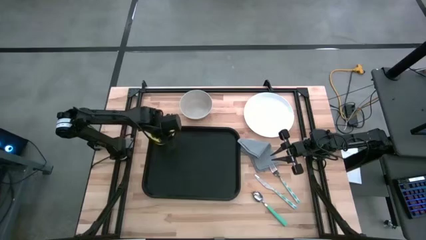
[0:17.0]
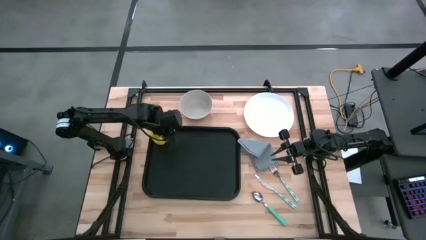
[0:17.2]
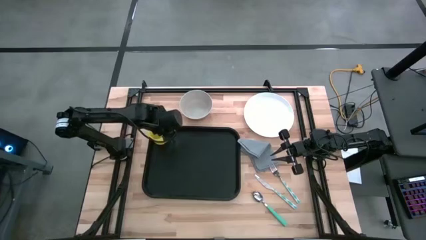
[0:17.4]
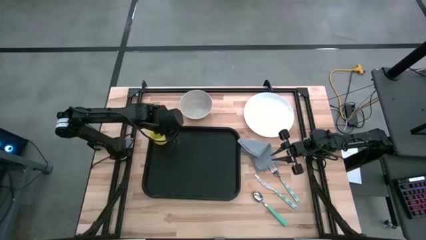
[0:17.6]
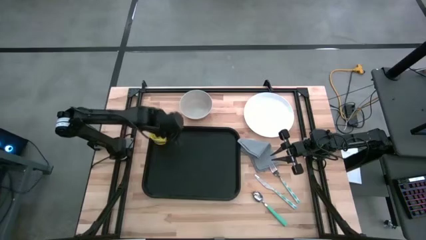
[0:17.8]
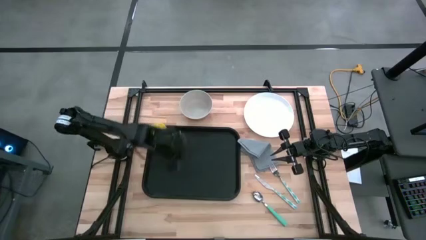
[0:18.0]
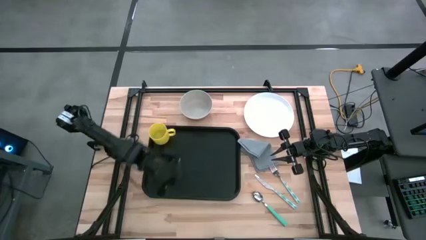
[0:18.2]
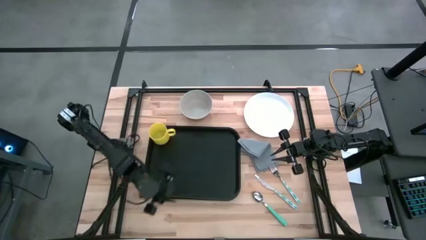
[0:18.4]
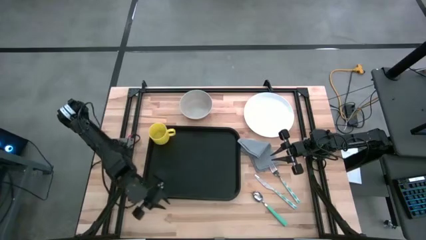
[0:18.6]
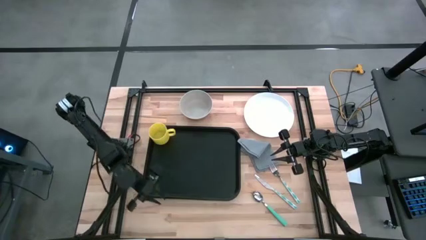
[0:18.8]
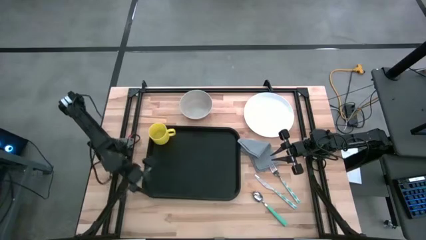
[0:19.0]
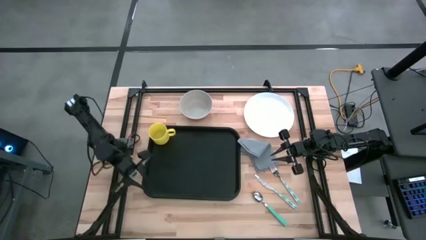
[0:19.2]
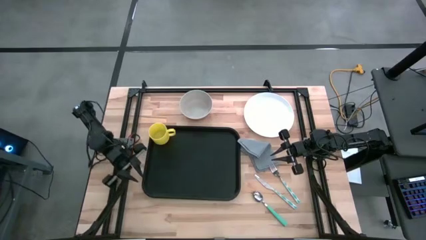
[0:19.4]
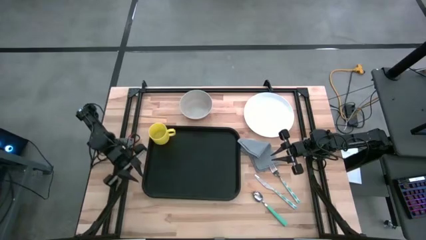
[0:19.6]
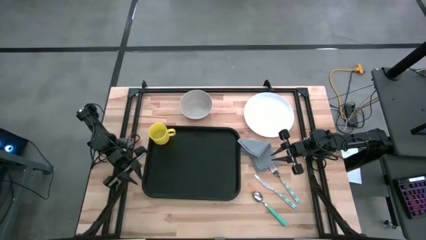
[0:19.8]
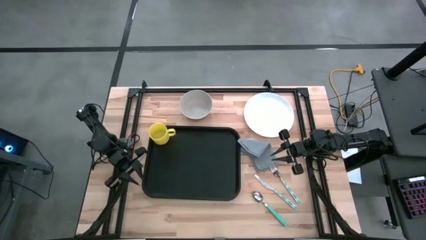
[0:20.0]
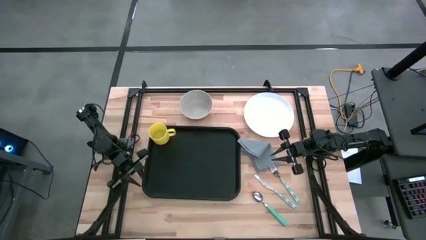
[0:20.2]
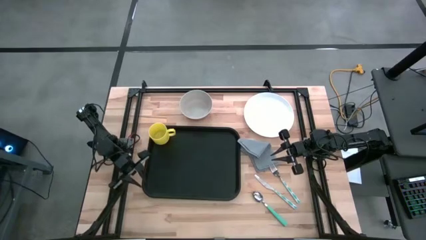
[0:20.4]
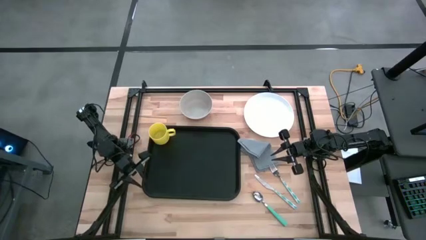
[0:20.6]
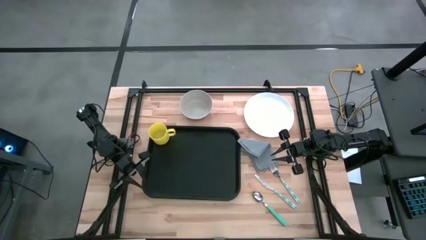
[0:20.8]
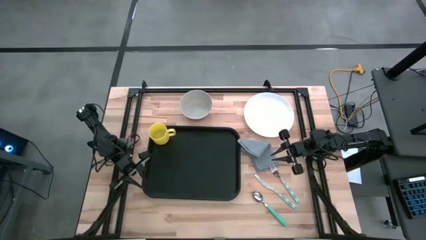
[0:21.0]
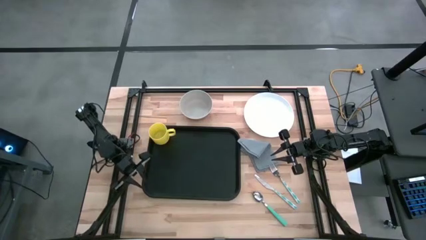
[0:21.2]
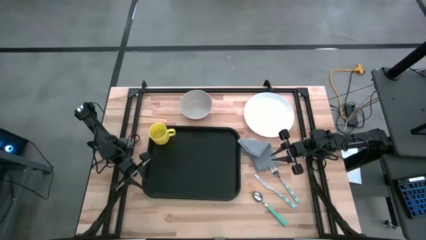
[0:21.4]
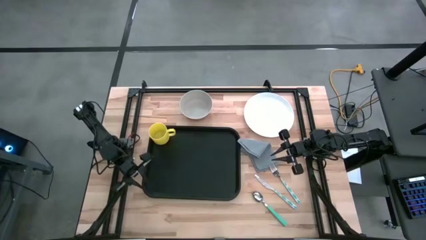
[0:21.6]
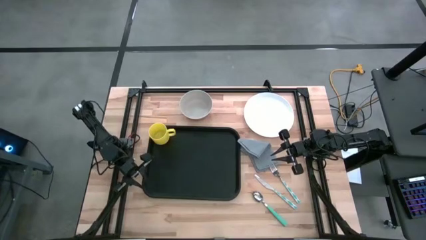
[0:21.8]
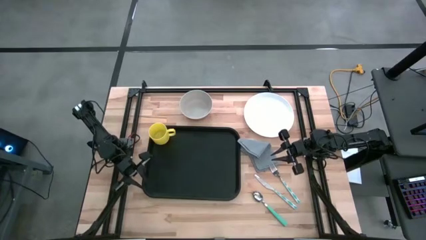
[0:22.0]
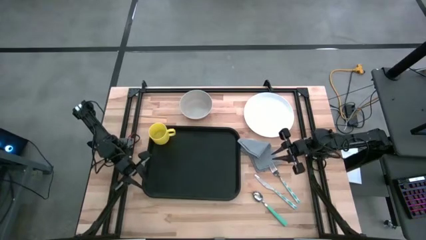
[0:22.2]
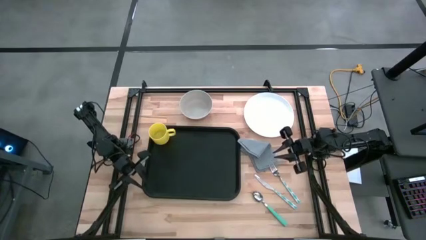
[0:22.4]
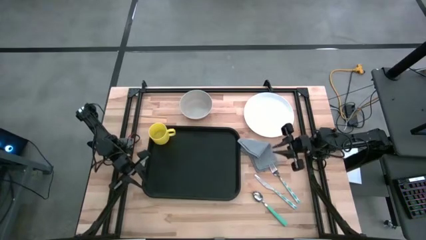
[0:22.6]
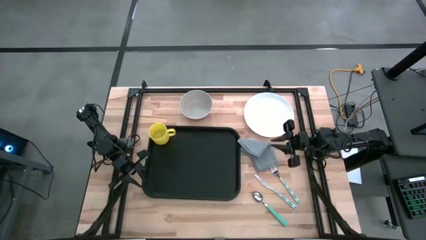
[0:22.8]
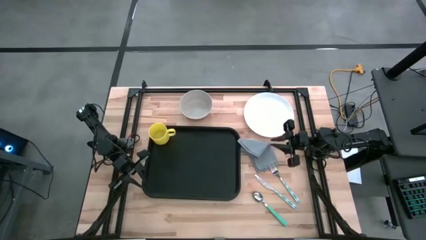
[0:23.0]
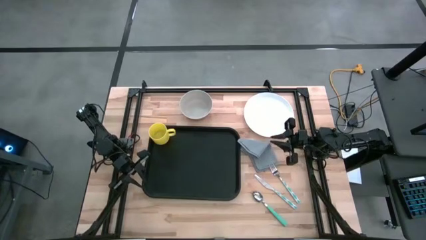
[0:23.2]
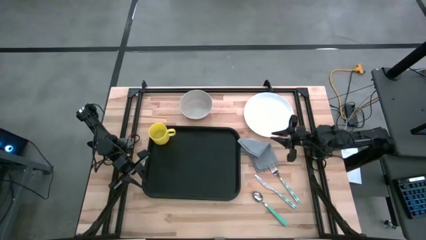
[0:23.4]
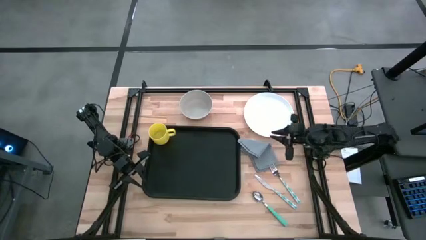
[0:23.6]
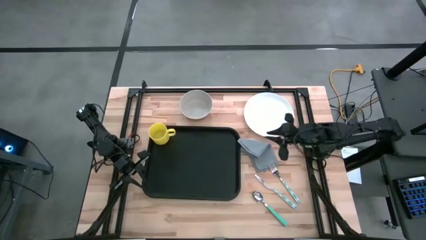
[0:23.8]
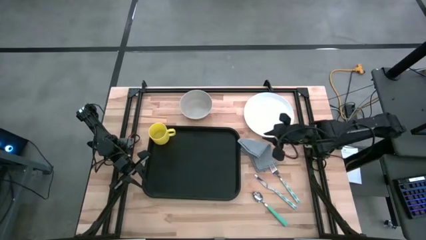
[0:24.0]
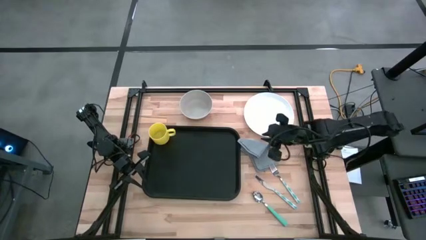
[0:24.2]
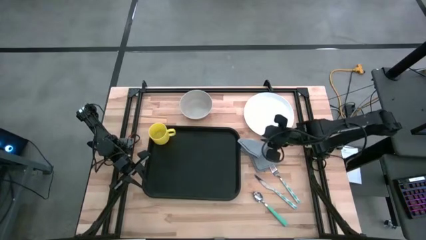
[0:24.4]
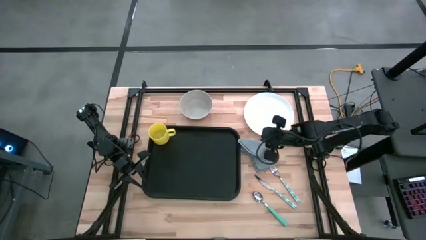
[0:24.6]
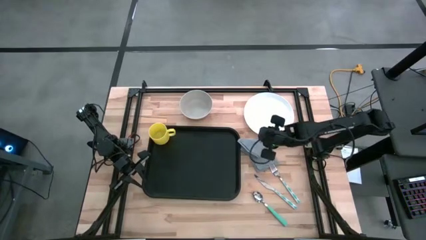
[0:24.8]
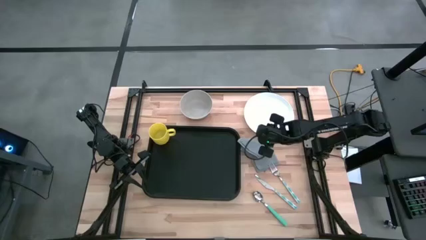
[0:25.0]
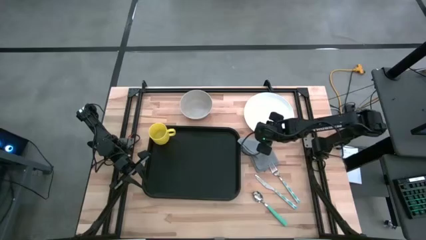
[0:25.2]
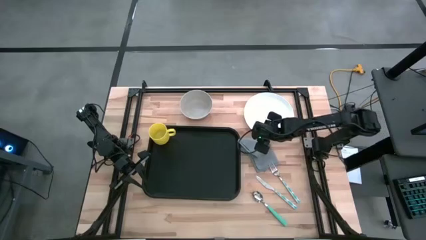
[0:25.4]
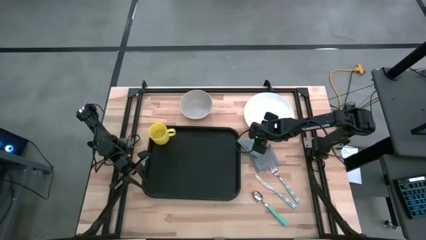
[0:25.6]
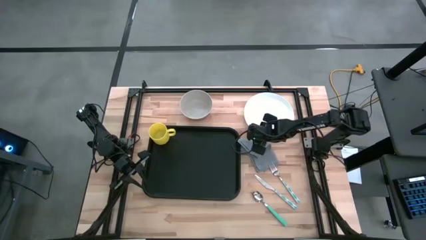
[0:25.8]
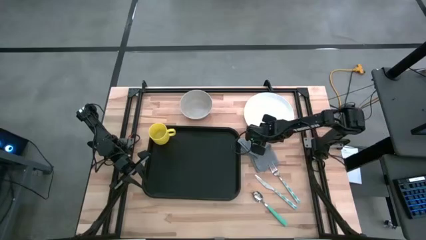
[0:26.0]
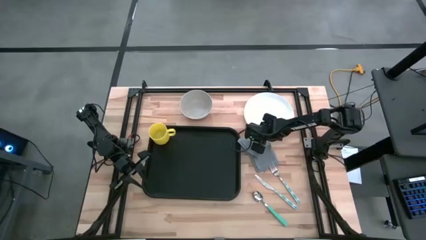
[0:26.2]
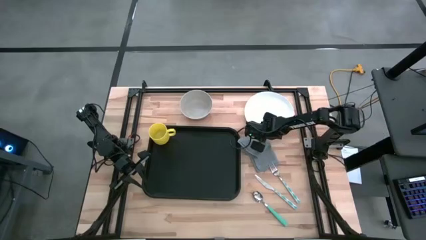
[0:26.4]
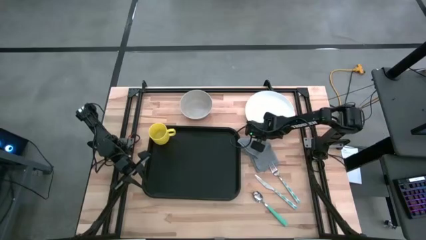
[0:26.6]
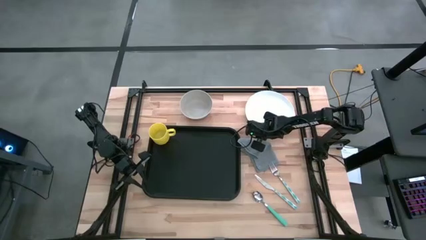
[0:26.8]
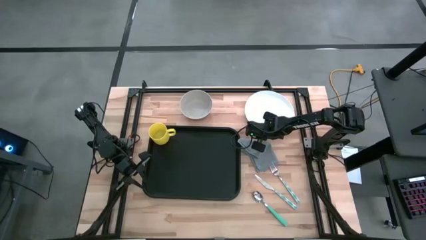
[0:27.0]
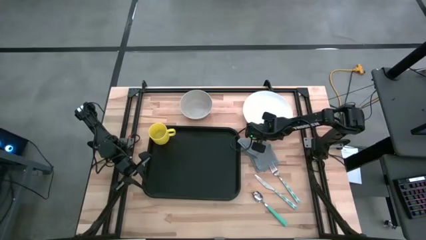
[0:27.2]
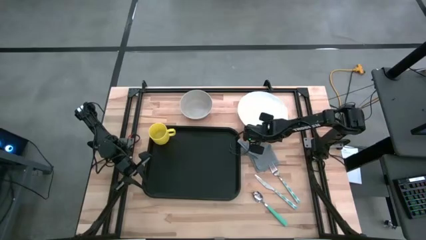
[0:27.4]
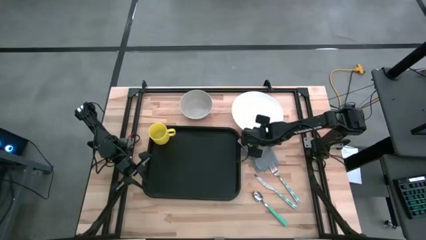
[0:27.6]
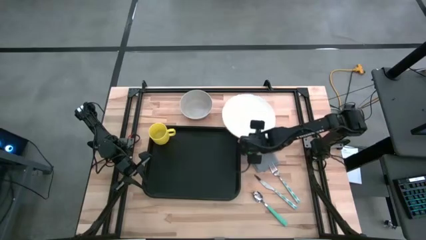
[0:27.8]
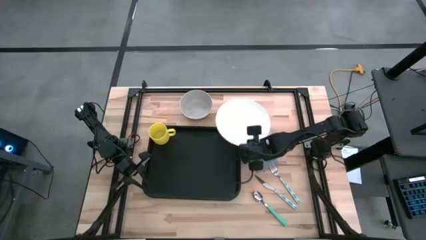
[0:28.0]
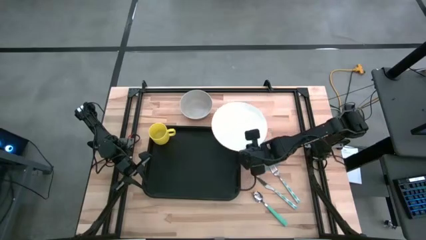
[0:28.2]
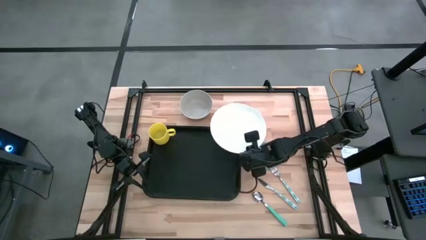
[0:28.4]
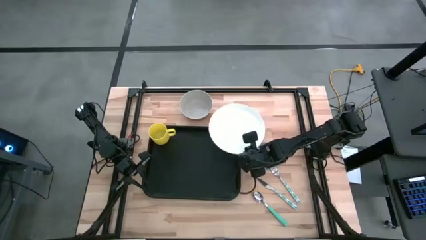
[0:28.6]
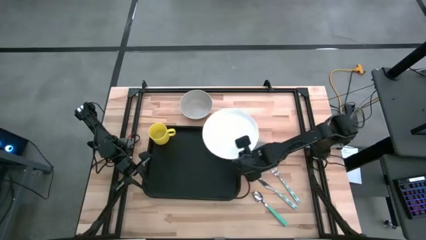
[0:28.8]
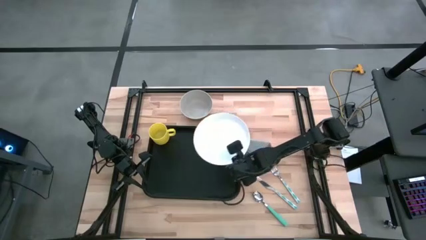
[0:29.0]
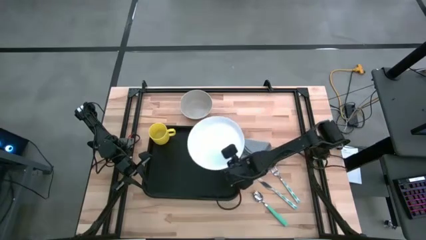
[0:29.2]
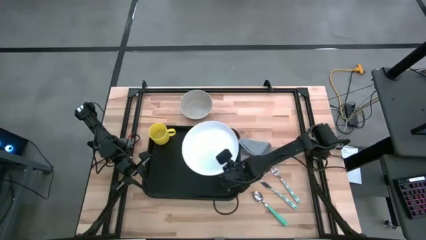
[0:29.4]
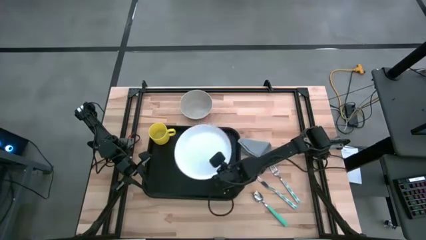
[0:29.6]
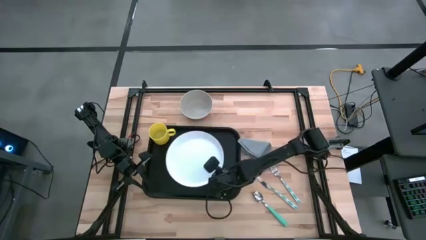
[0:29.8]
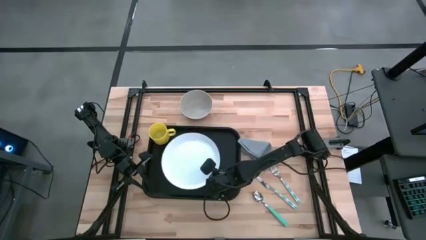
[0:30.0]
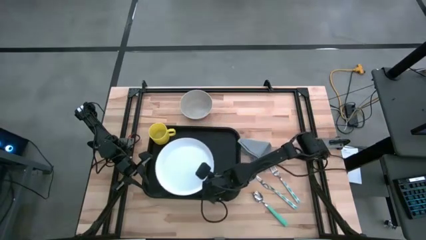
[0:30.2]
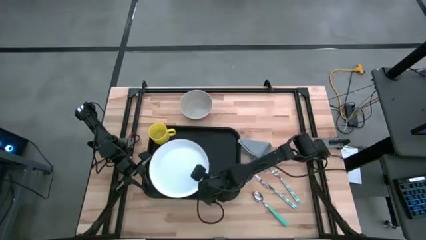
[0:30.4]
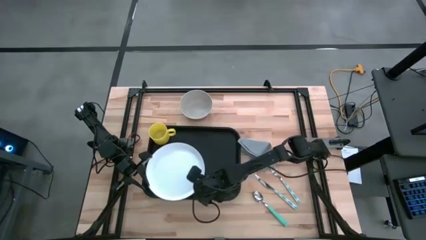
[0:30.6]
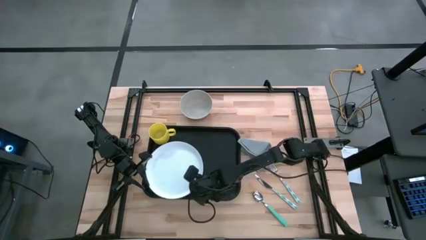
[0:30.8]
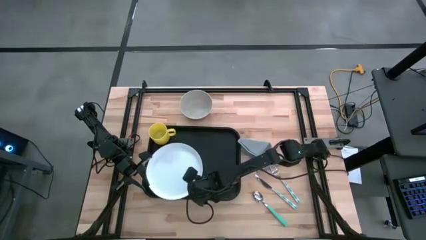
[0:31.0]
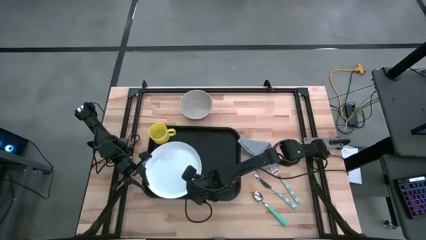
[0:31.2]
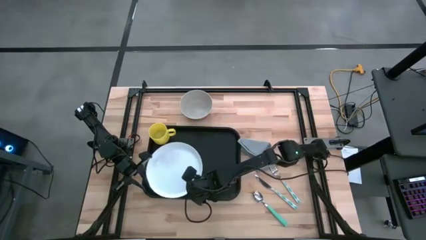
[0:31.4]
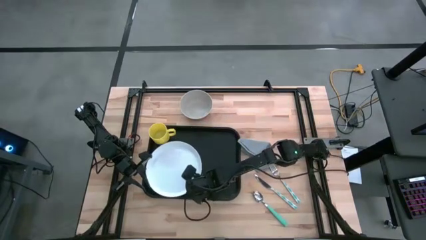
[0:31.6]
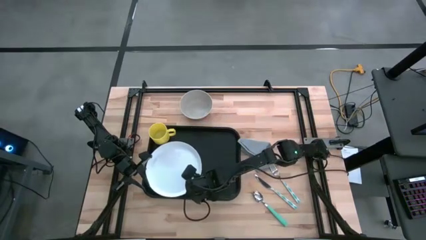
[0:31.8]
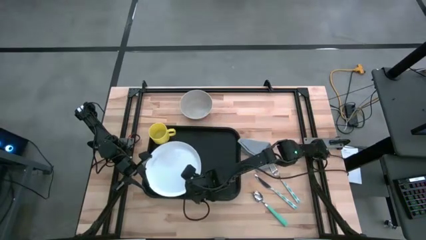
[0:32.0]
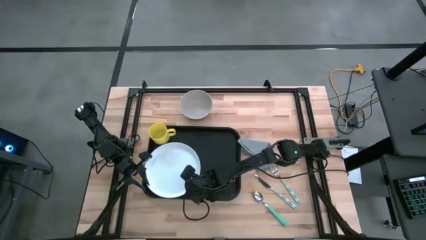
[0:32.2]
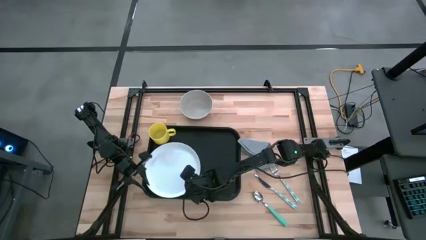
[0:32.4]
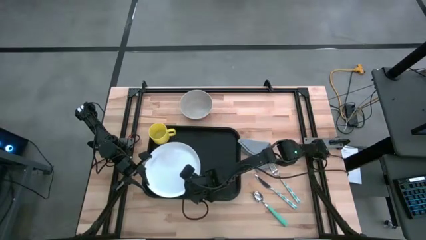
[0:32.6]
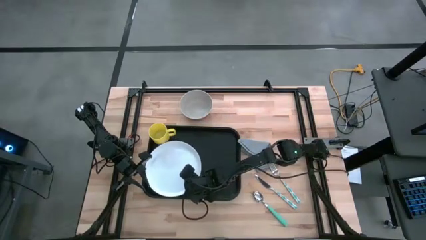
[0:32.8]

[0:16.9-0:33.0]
Task: Set up tray
Put the white plate on the black serving tray below the yellow mug
